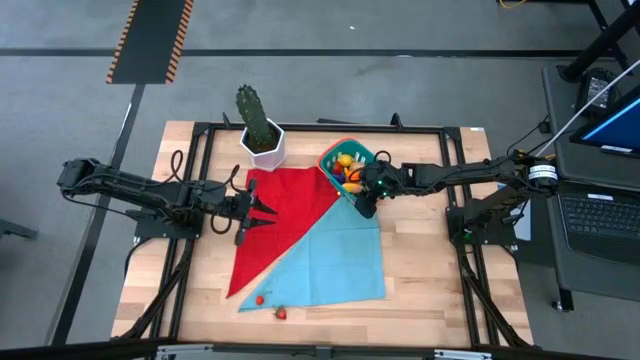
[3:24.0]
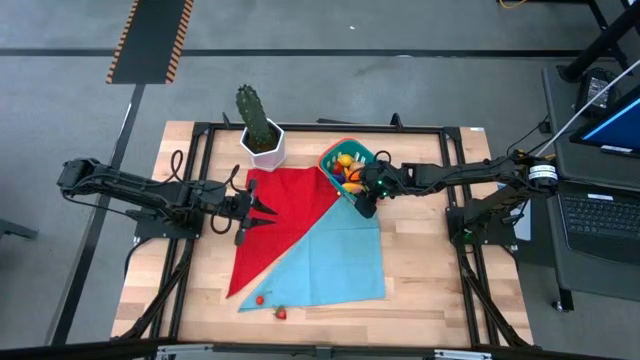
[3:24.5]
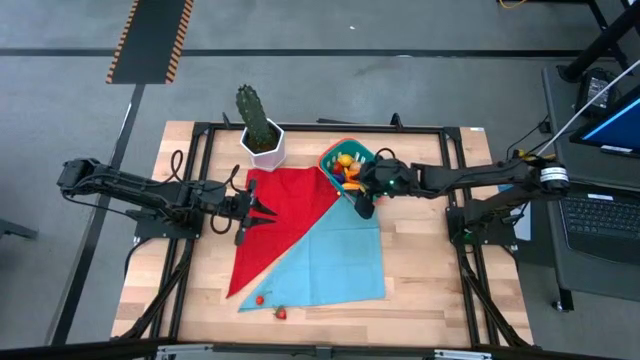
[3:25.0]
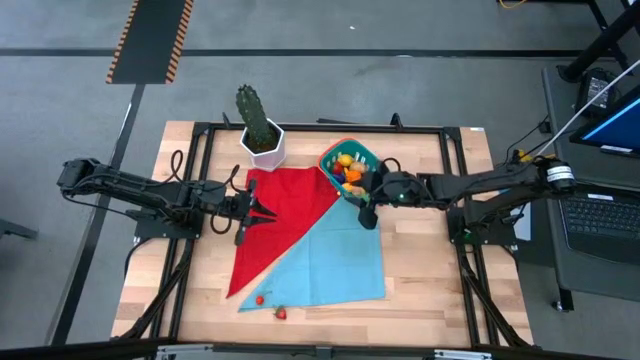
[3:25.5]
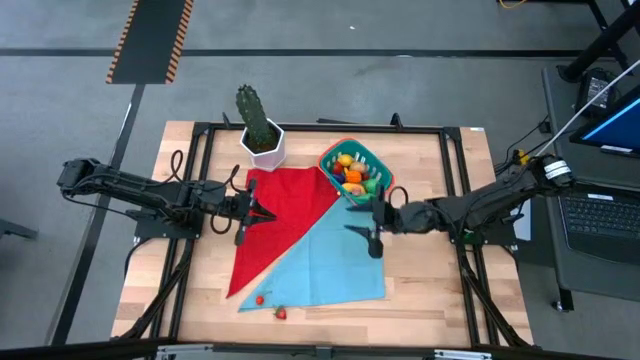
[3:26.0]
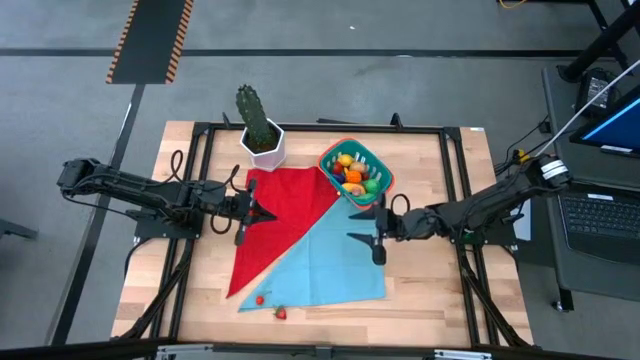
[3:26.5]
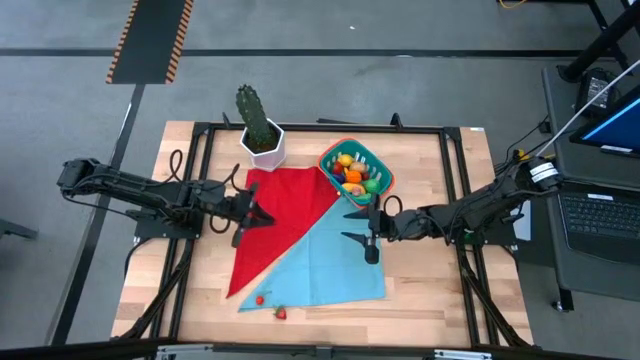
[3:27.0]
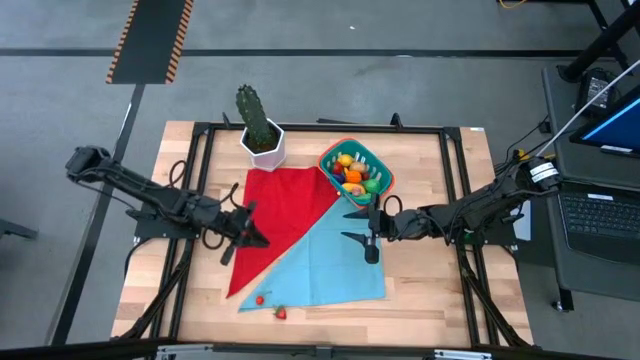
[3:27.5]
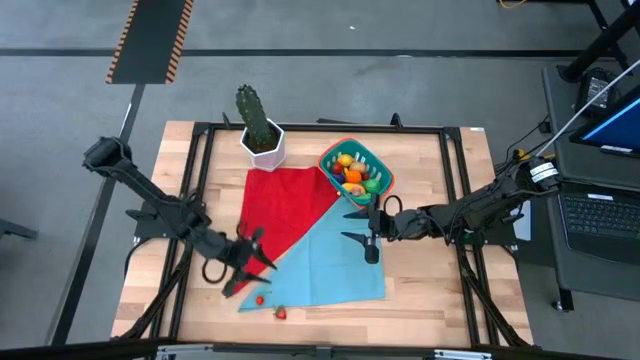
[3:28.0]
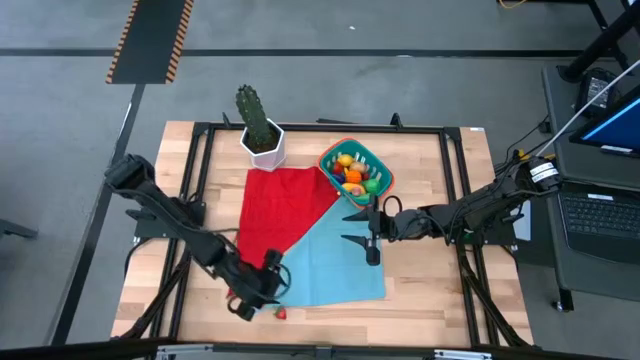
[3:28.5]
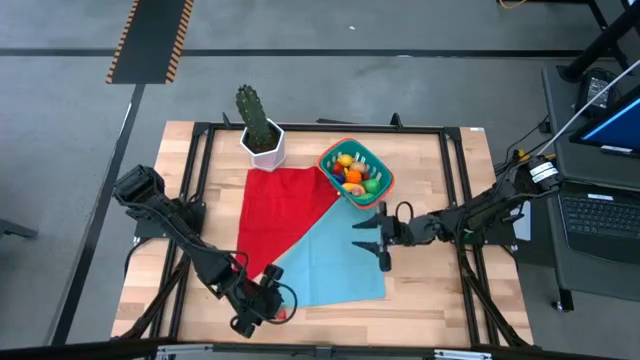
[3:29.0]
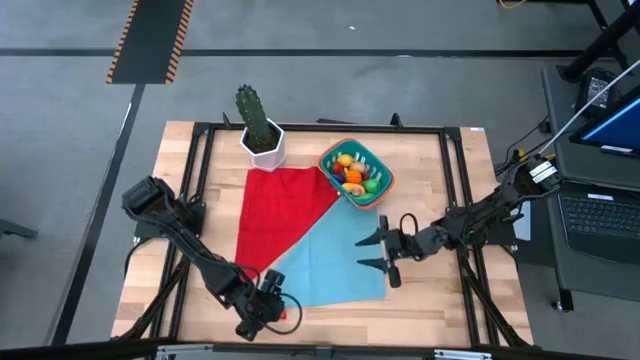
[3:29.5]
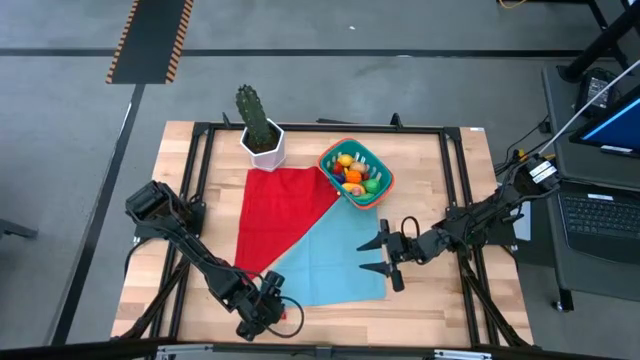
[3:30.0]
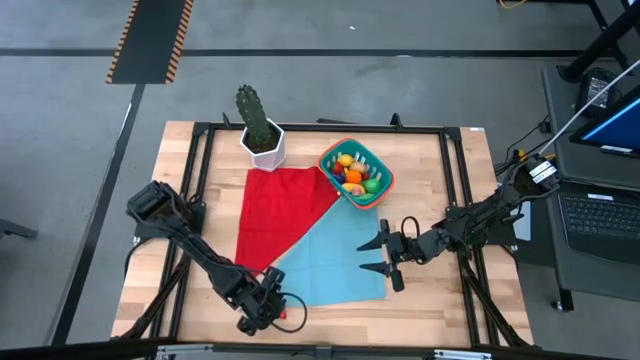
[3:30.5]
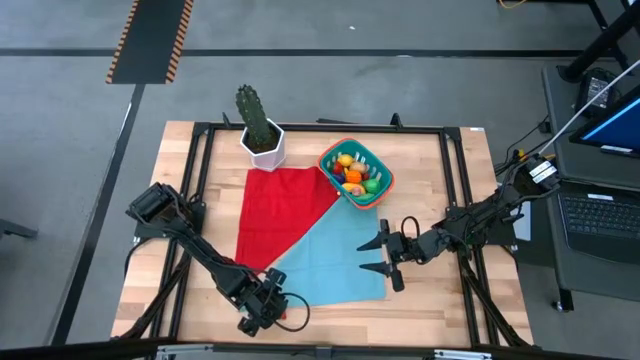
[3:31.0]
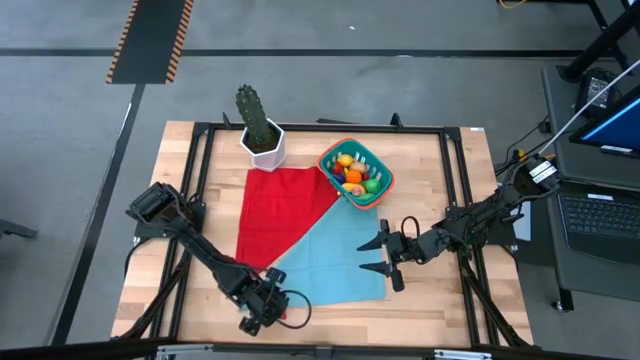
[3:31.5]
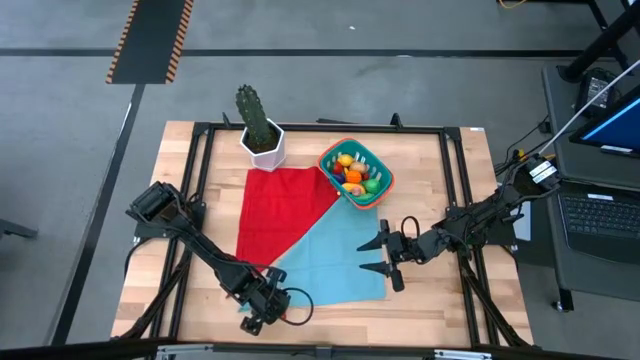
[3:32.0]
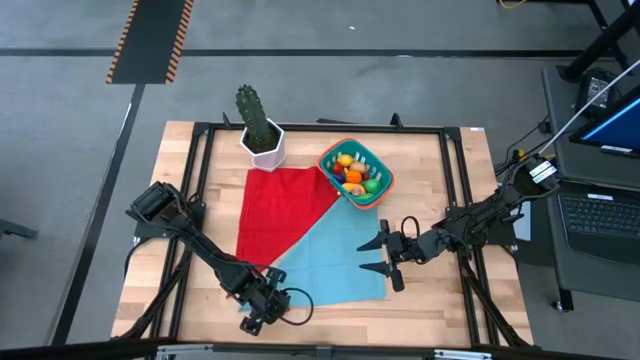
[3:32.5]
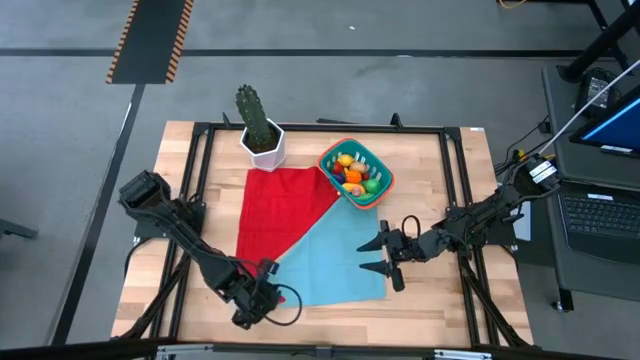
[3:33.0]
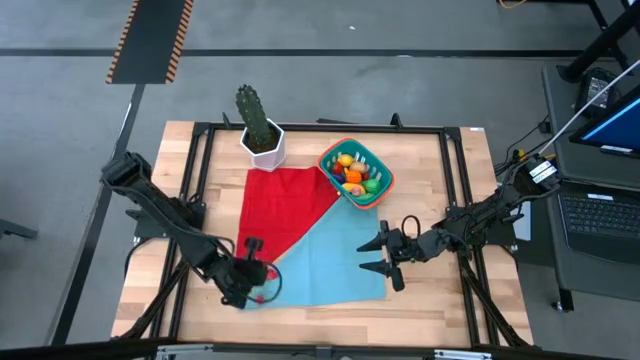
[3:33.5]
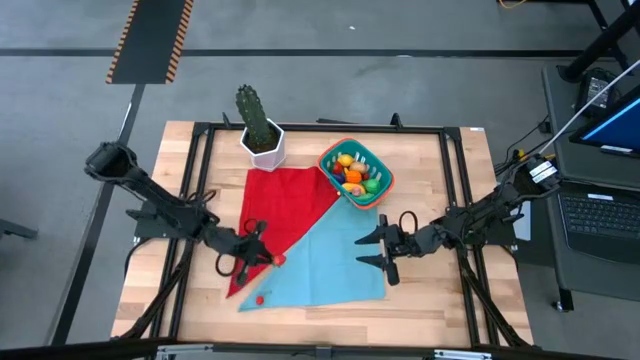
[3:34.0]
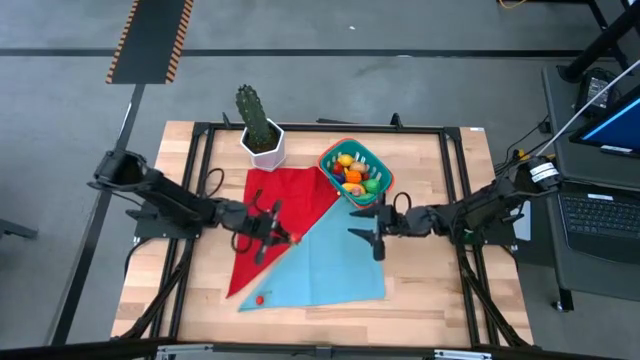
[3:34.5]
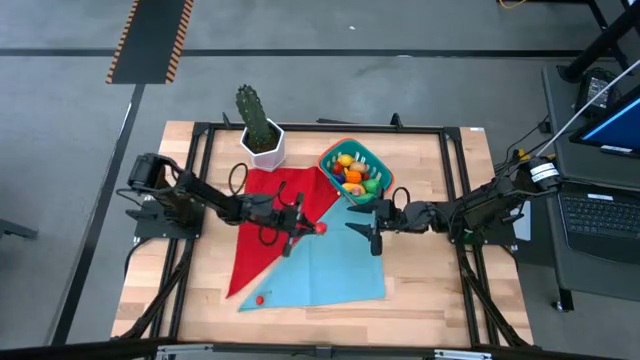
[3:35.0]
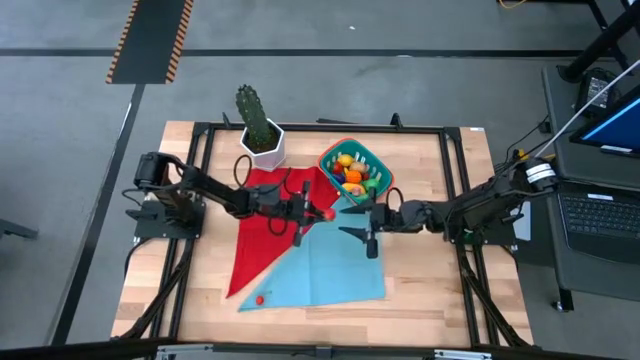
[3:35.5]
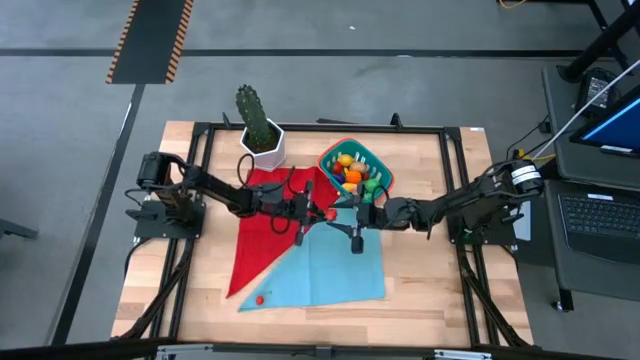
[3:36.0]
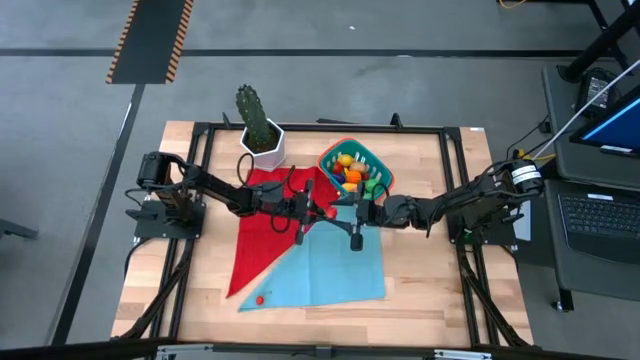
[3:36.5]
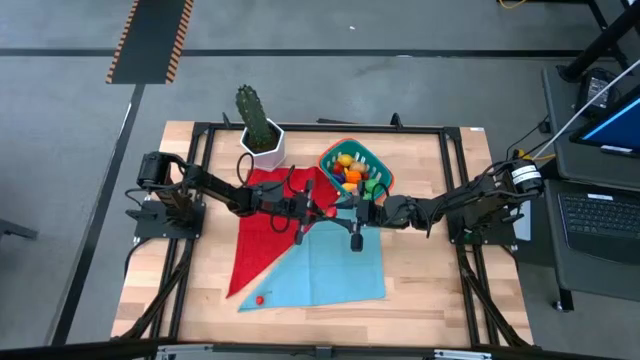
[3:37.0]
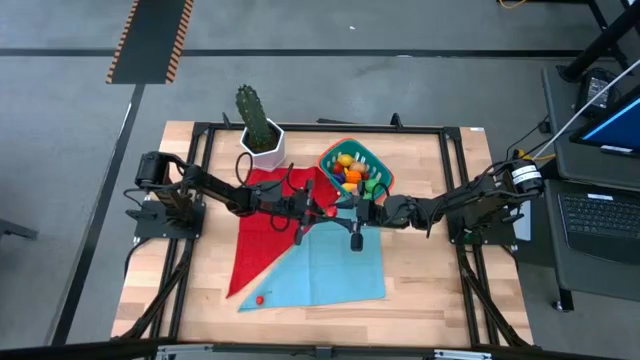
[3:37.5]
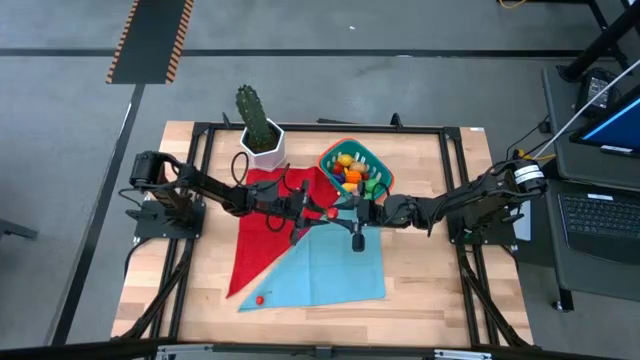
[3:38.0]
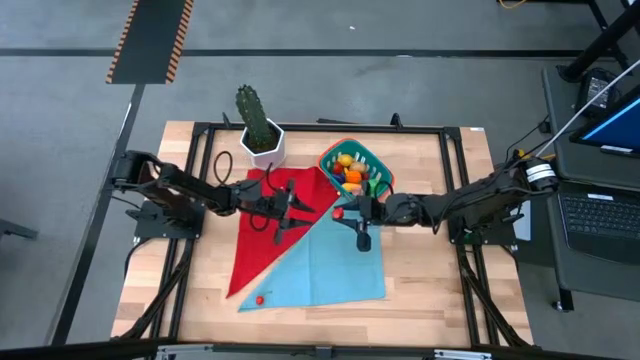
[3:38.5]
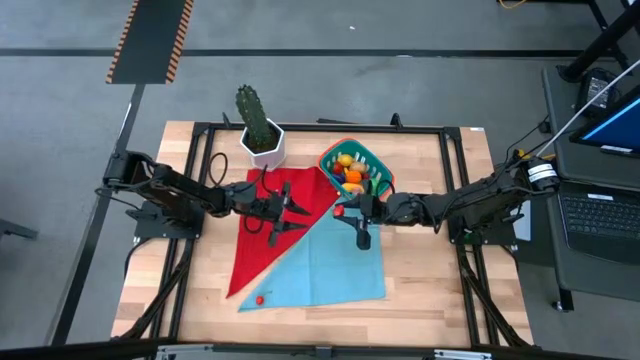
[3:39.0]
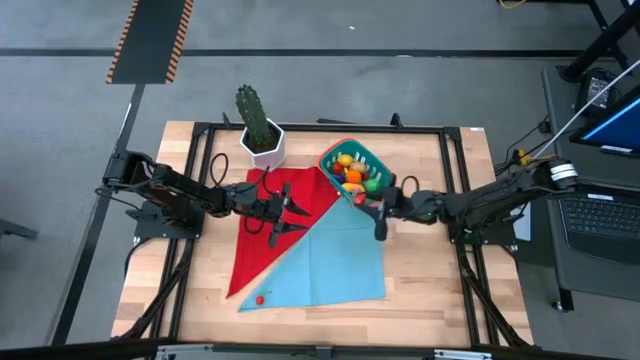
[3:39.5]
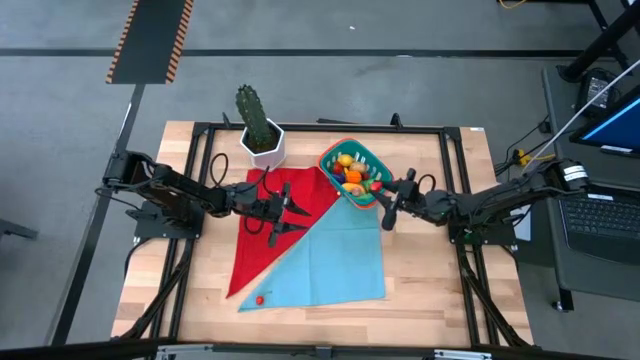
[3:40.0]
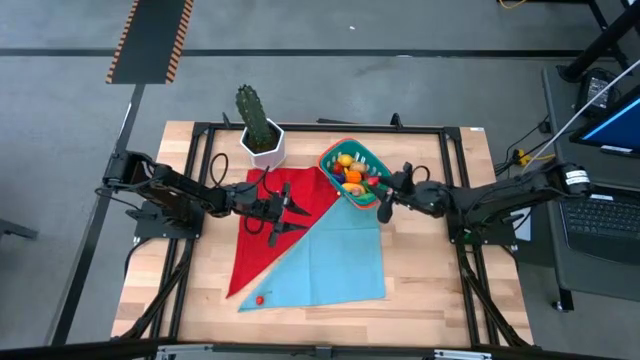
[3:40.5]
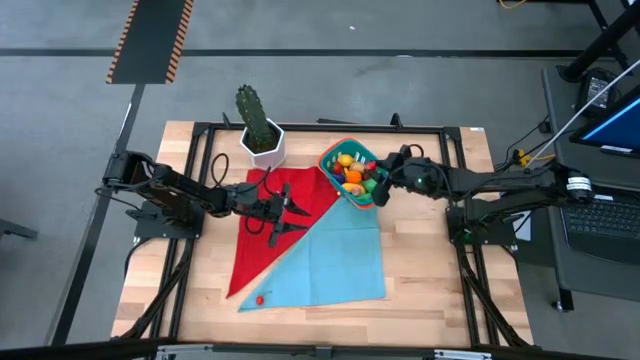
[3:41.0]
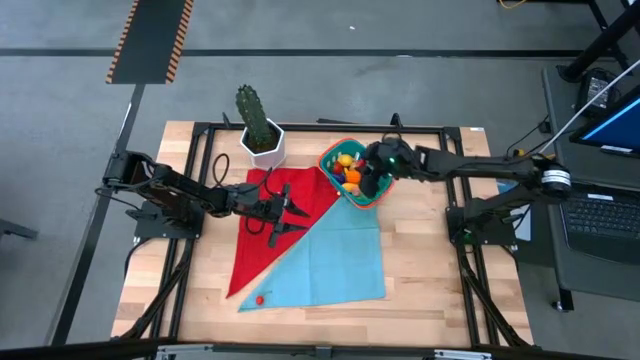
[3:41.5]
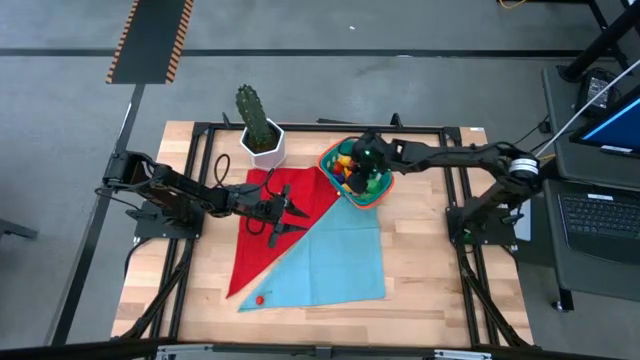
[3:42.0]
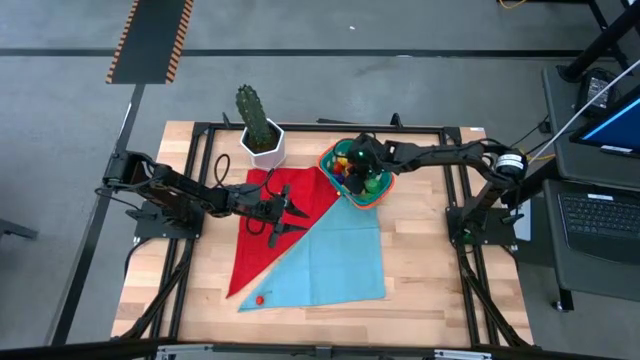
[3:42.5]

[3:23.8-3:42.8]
Task: Build produce basket
Put the red strawberry into the blue basket

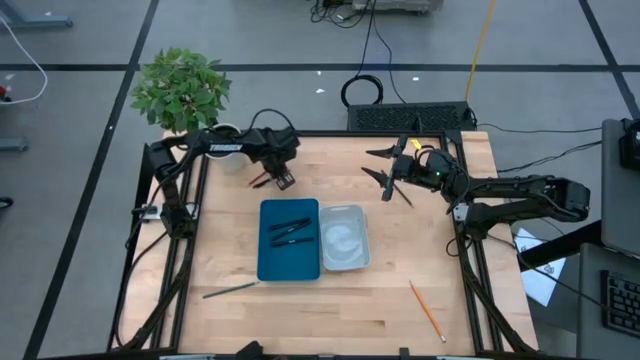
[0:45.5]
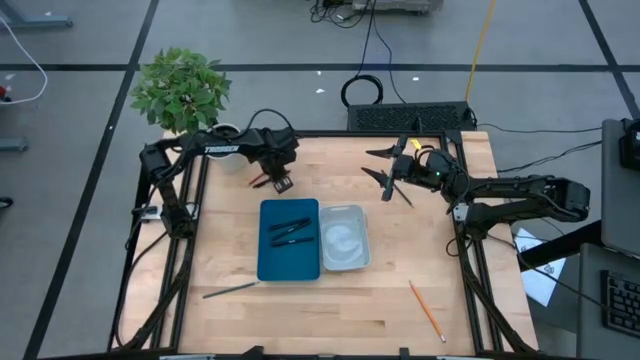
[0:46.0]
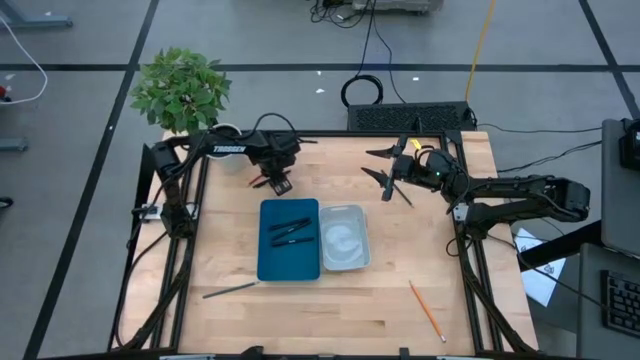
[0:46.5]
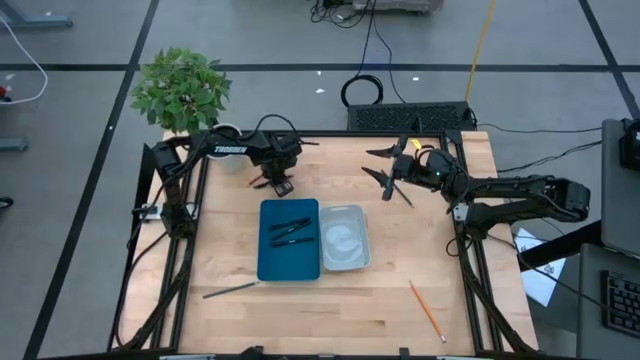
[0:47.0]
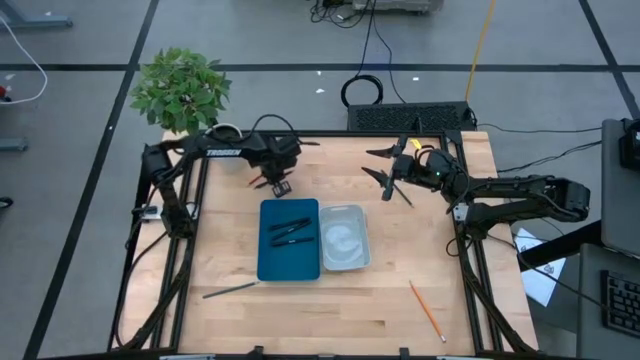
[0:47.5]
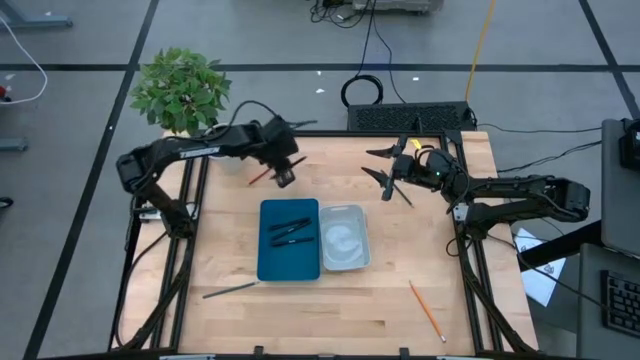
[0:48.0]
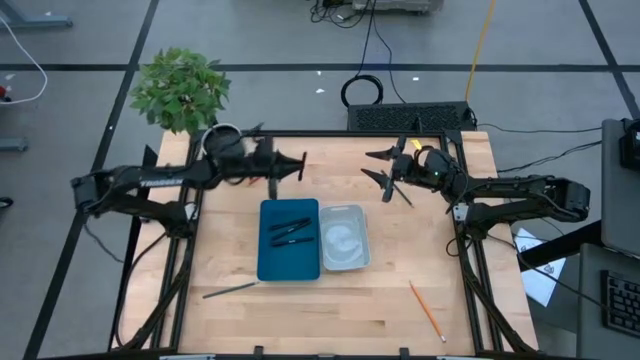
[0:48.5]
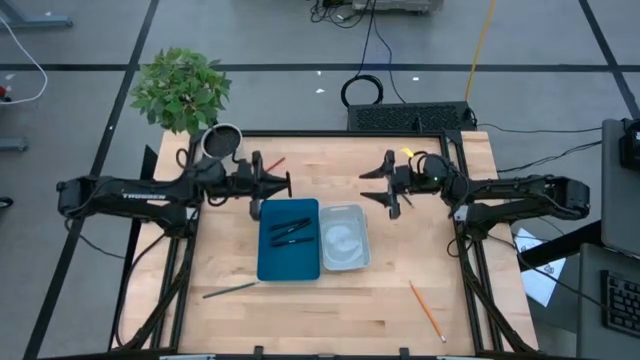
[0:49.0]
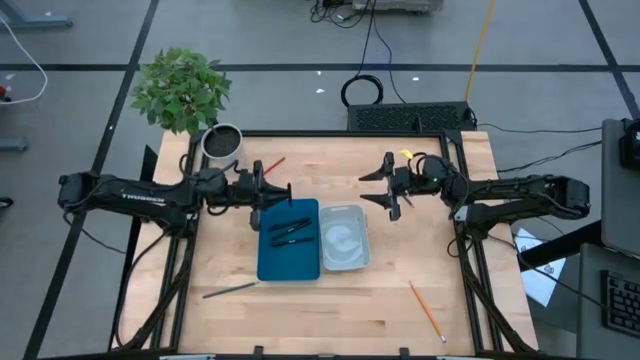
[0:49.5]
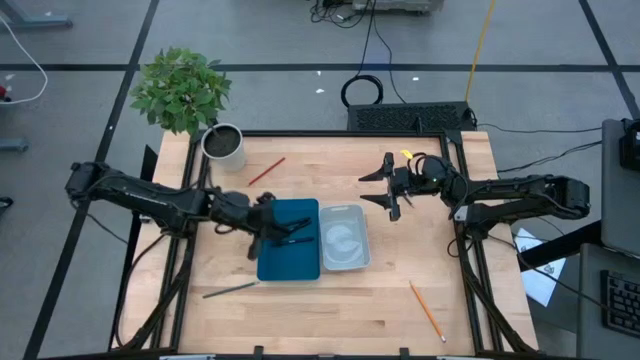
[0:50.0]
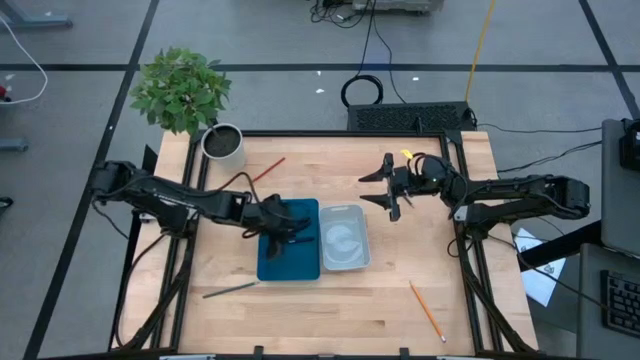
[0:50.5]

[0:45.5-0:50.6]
Task: Sort pens & pencils
Put the black pen into the blue bin
